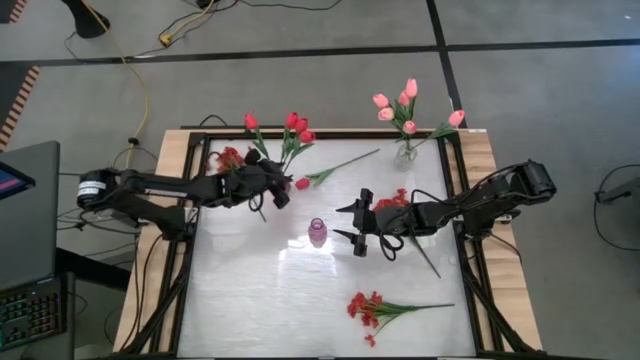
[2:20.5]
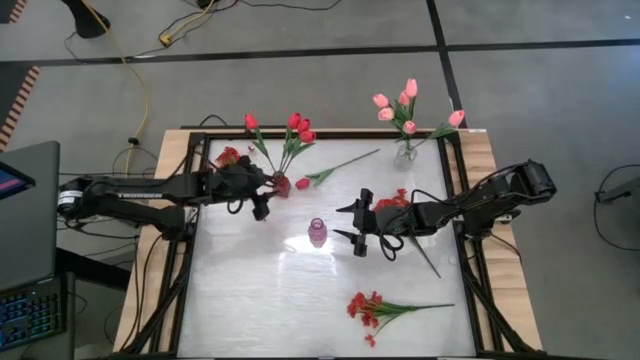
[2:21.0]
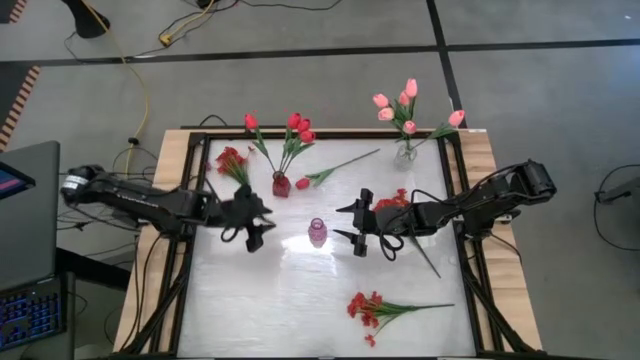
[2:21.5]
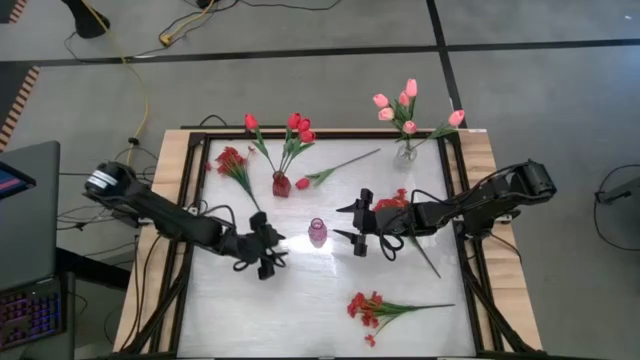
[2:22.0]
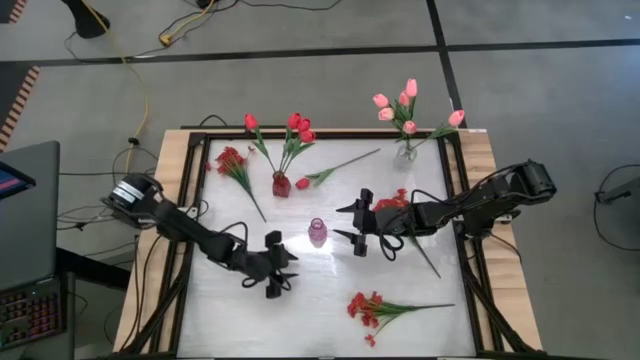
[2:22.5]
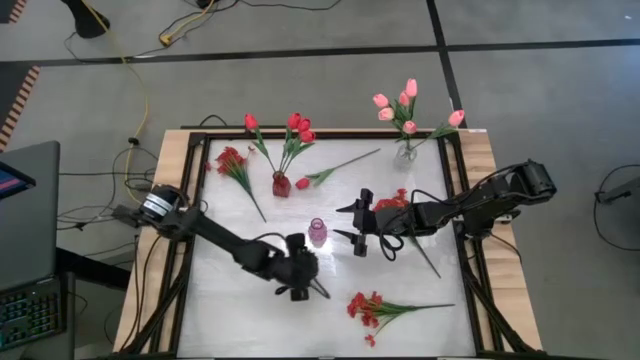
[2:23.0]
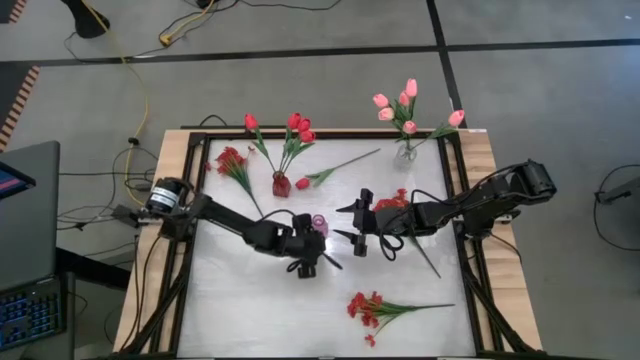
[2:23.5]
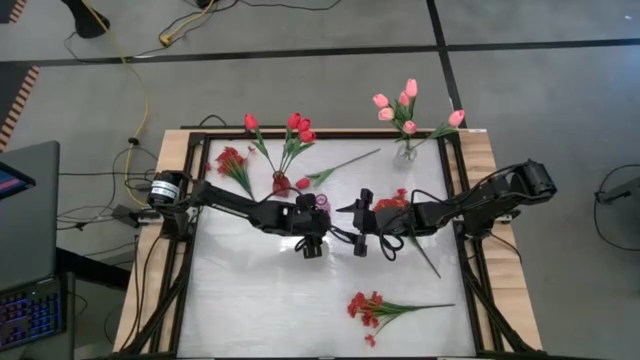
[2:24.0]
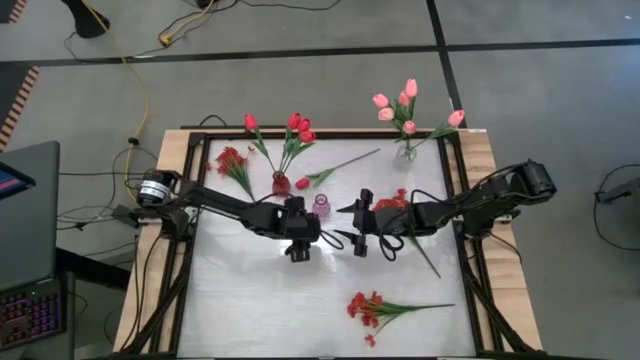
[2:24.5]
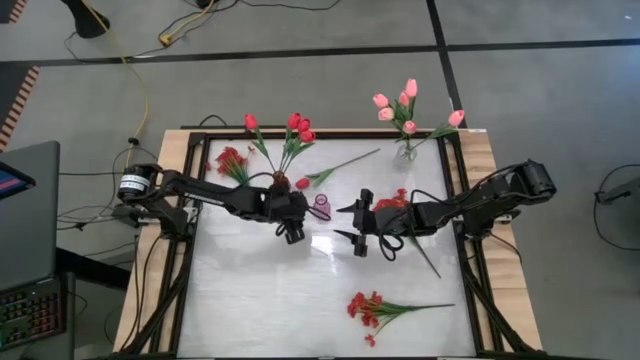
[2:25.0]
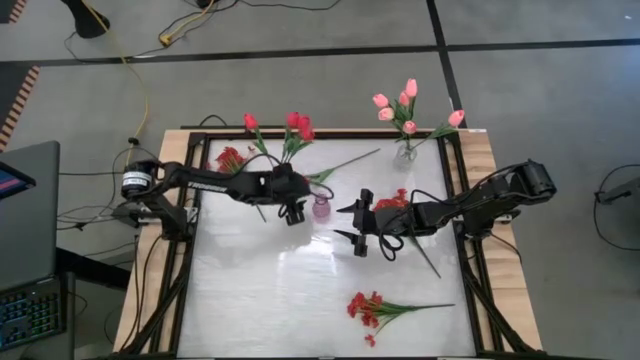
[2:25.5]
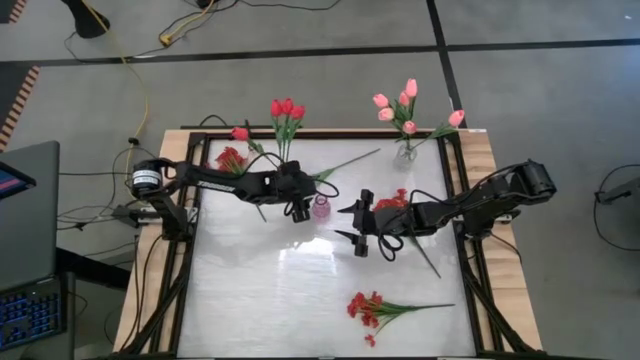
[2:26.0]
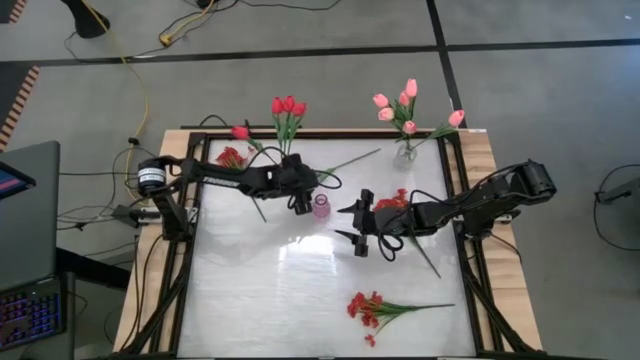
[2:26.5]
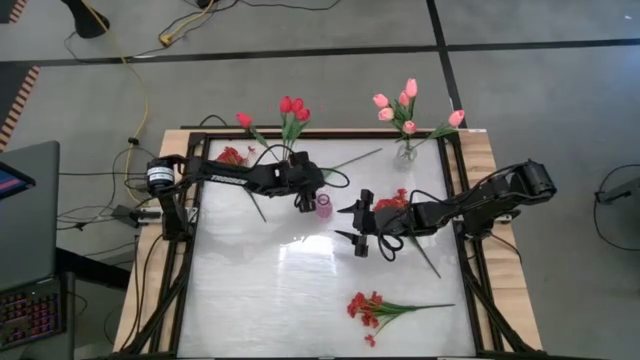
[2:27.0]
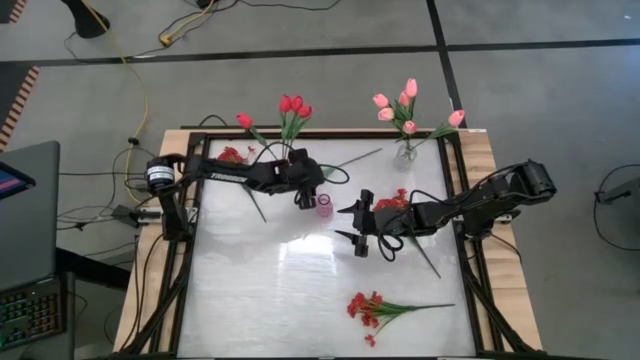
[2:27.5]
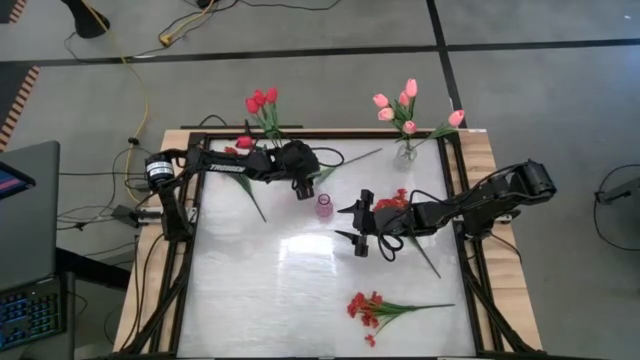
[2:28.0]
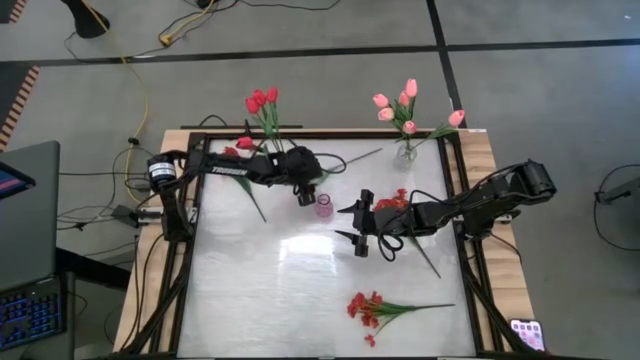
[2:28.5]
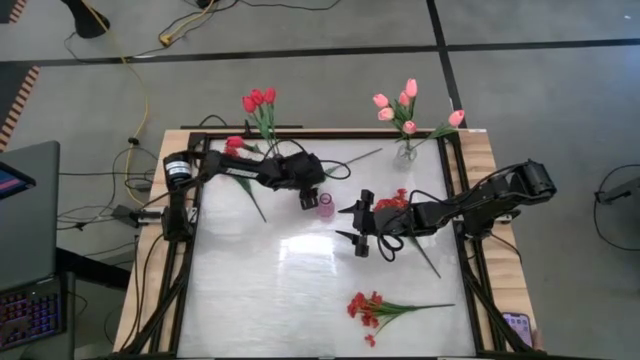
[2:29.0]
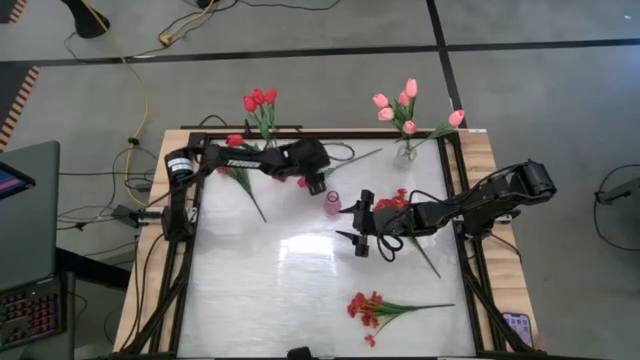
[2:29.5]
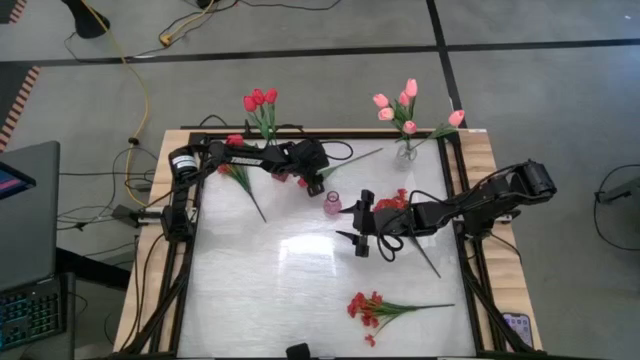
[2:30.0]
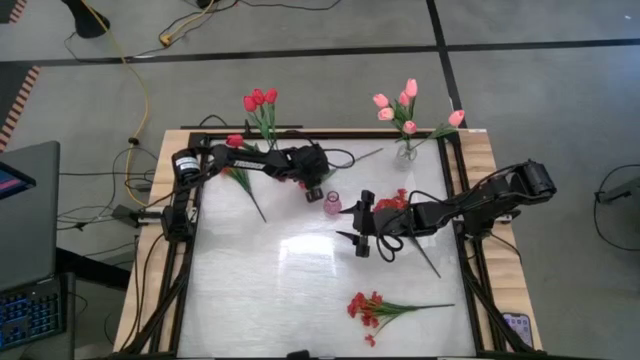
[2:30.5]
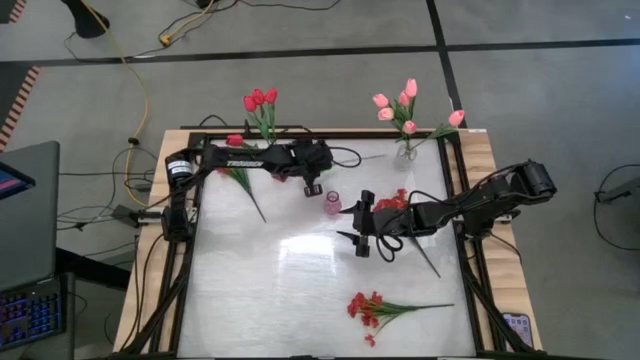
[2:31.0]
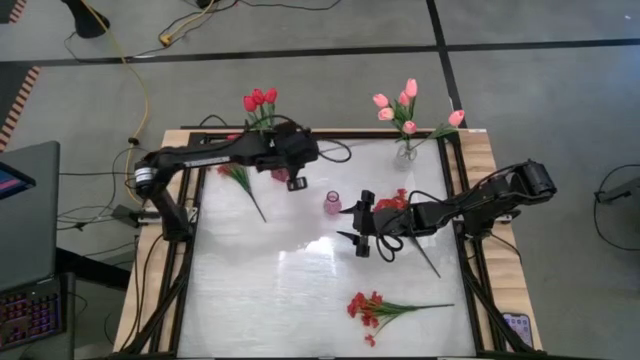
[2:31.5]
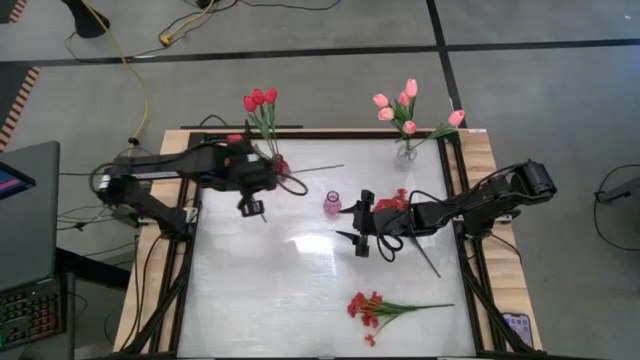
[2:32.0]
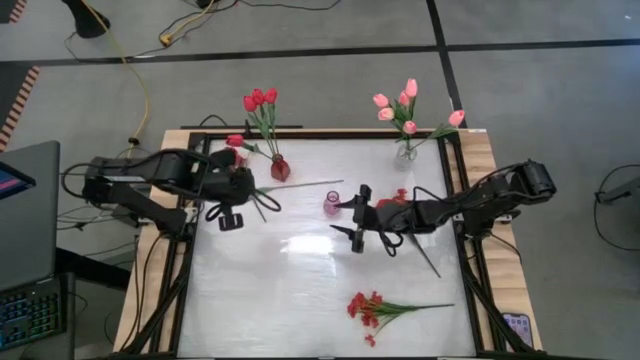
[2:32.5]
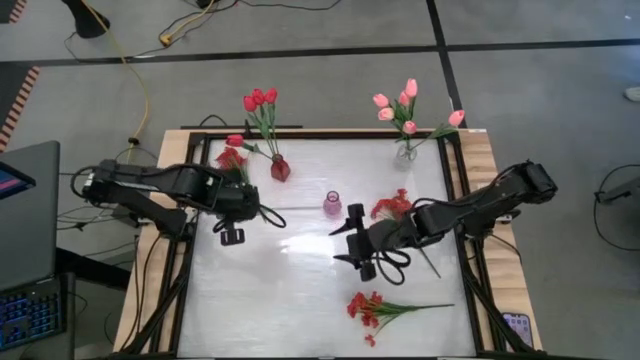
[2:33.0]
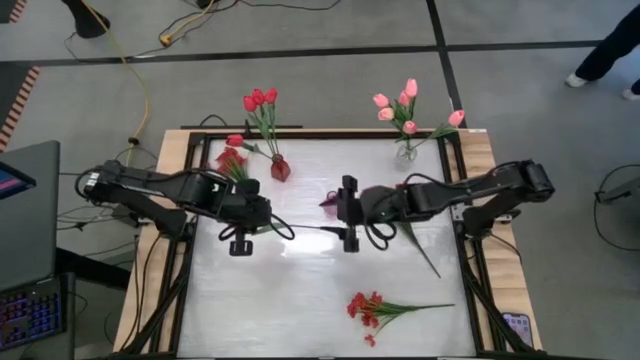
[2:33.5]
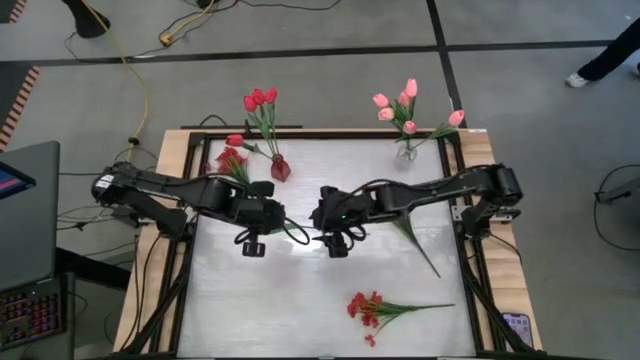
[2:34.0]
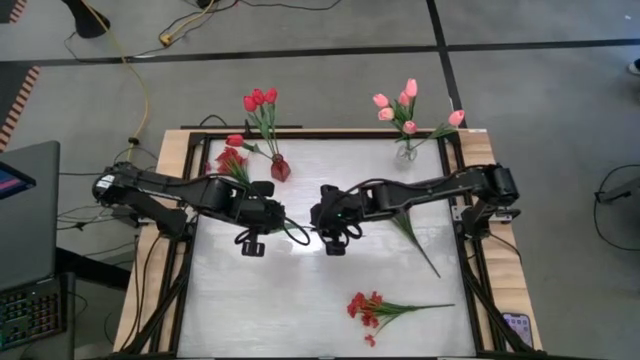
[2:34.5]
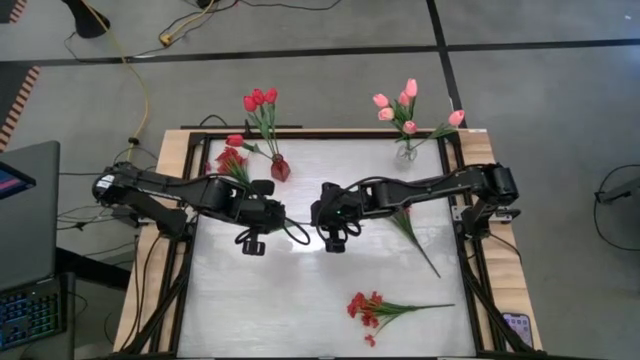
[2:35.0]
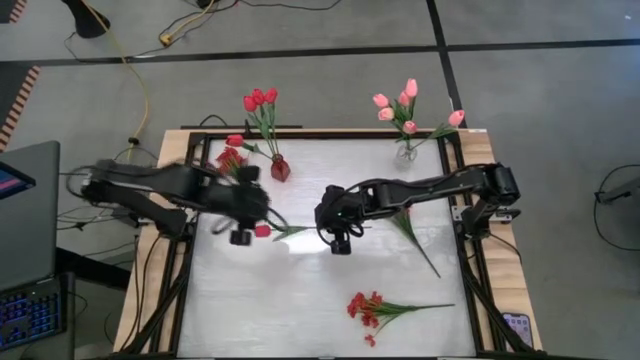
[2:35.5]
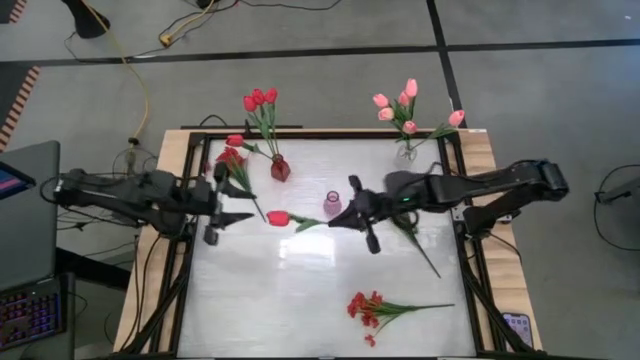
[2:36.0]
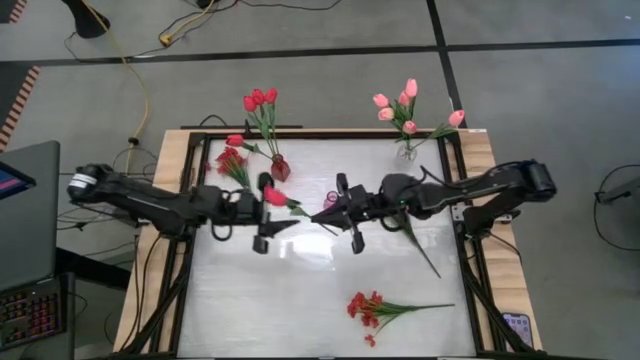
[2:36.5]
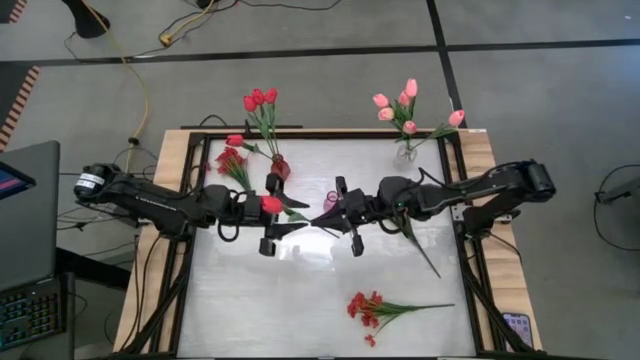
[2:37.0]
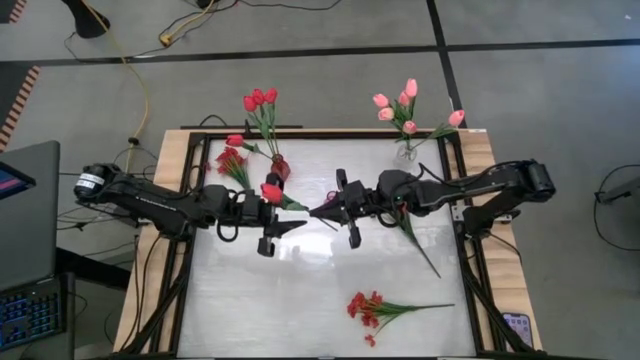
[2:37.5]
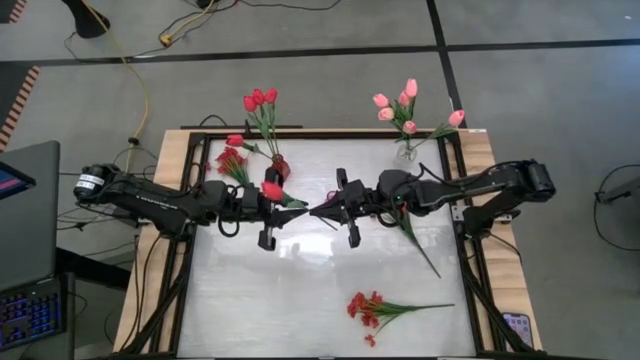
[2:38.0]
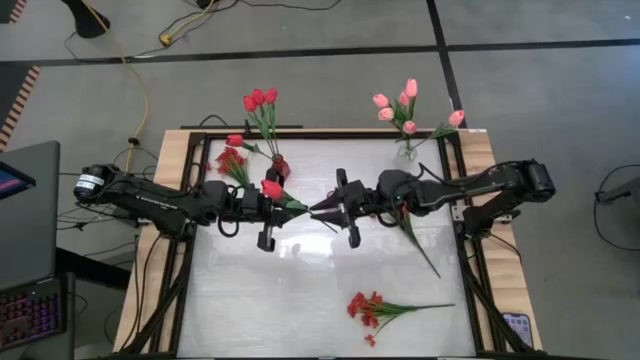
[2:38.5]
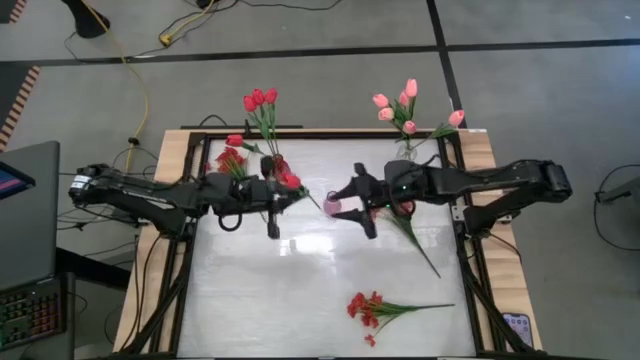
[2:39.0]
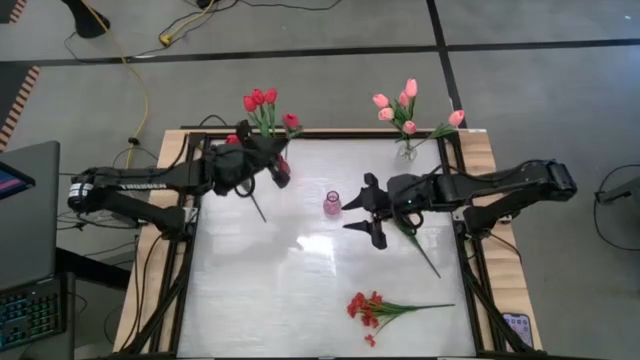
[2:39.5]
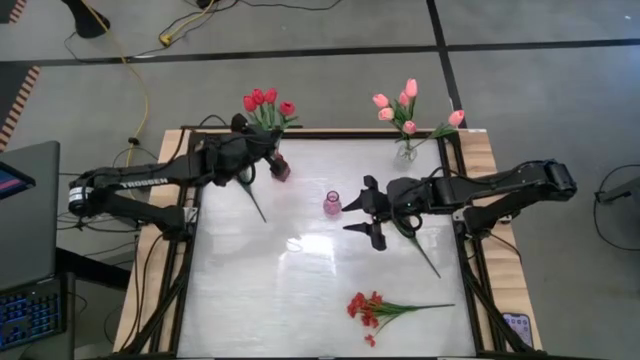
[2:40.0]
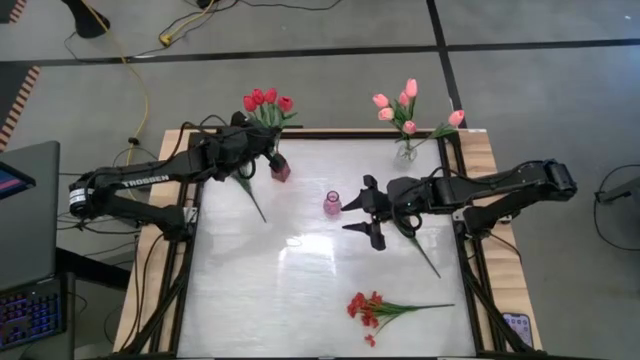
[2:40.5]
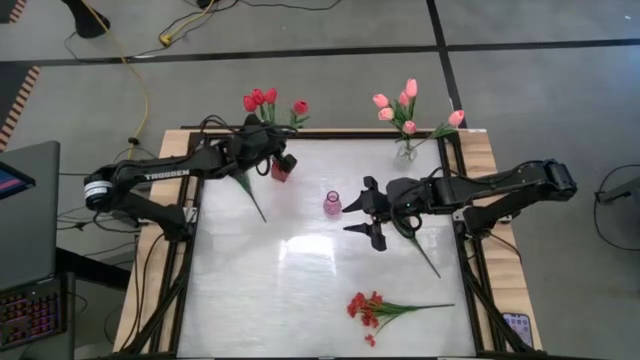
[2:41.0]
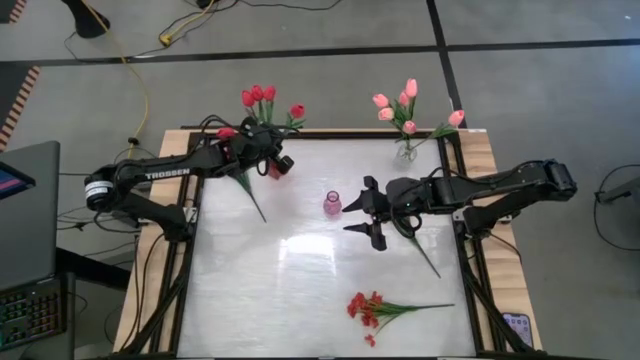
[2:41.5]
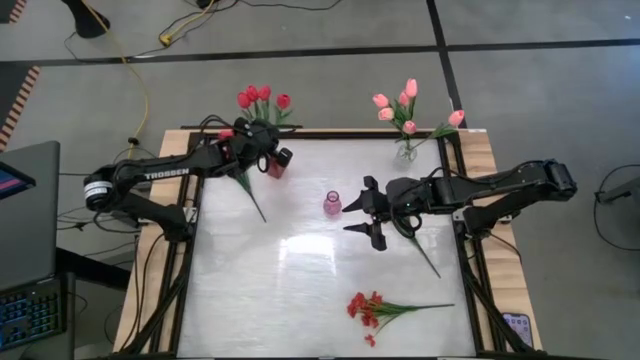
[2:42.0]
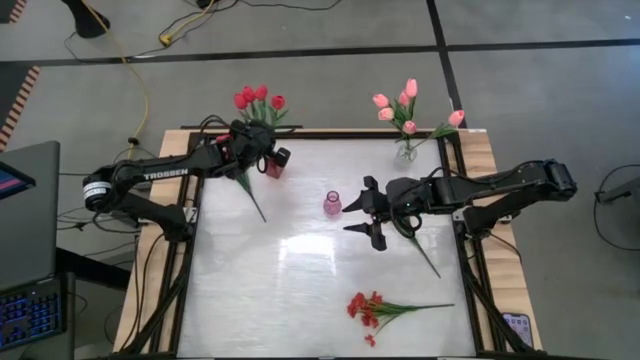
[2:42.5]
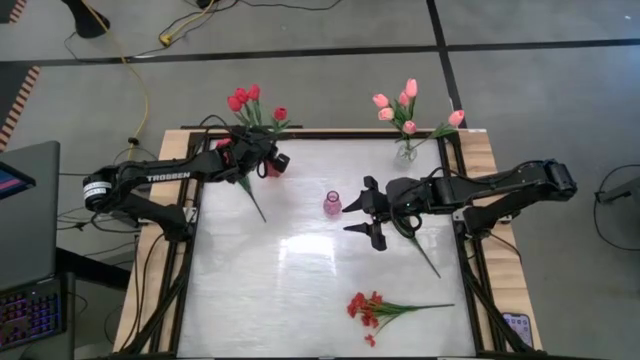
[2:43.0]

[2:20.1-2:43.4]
Task: Sort flowers into vase by color
Put the red flower into the red vase
